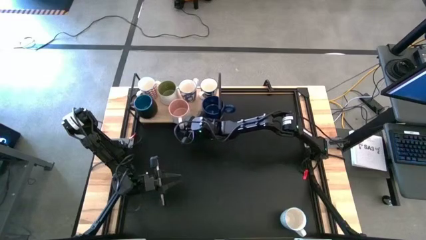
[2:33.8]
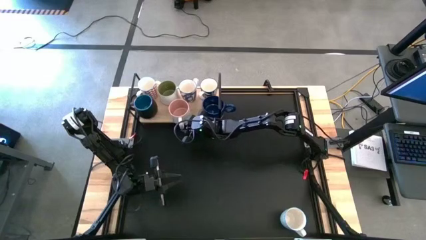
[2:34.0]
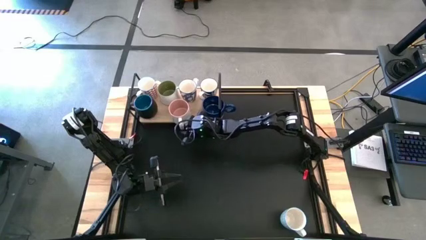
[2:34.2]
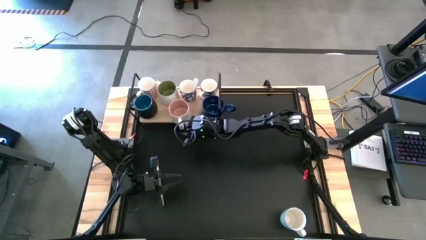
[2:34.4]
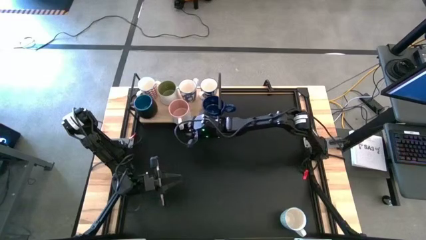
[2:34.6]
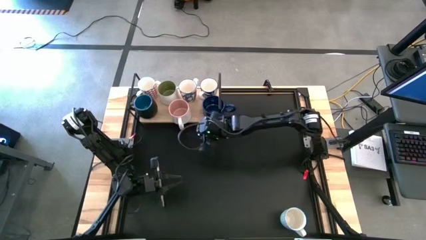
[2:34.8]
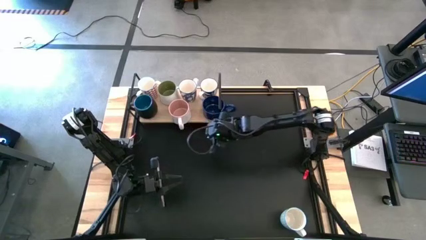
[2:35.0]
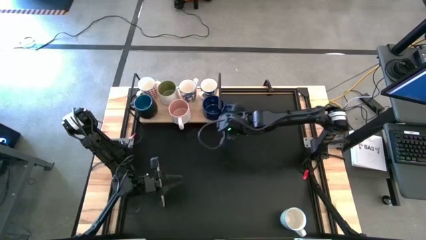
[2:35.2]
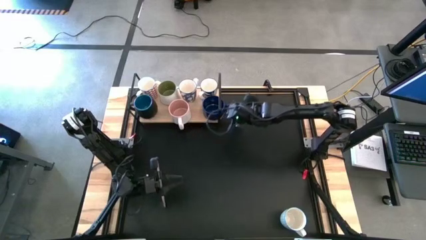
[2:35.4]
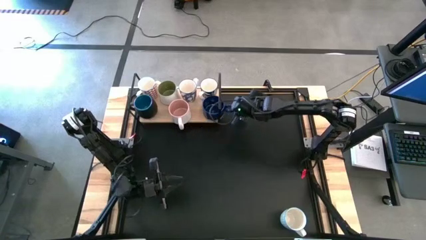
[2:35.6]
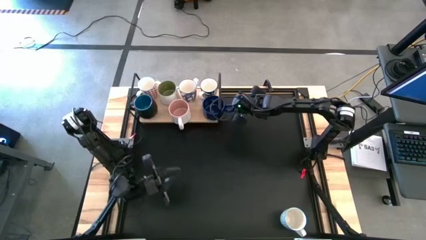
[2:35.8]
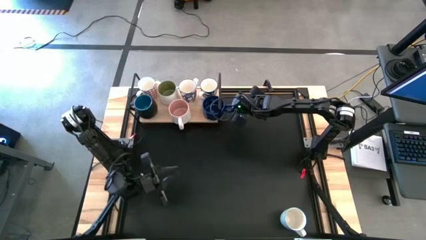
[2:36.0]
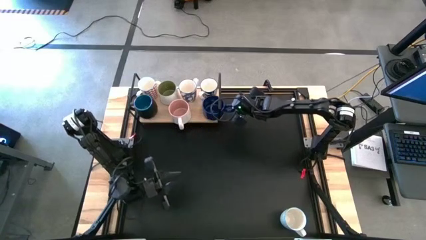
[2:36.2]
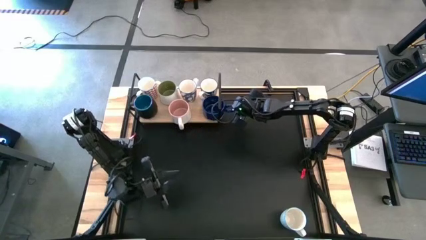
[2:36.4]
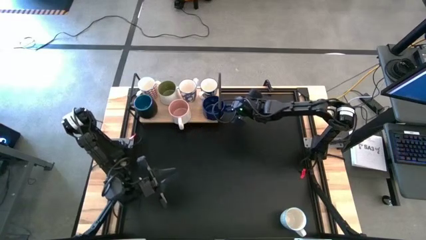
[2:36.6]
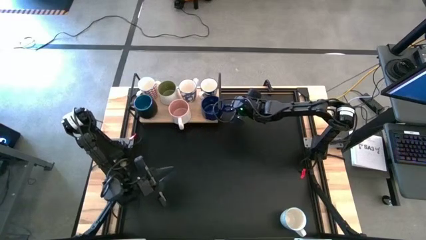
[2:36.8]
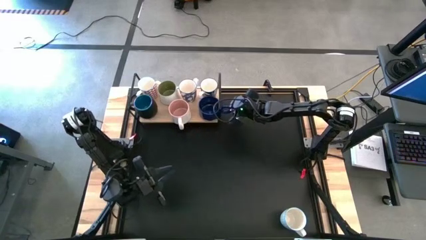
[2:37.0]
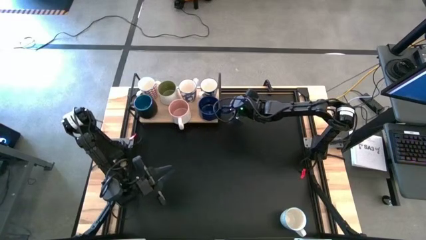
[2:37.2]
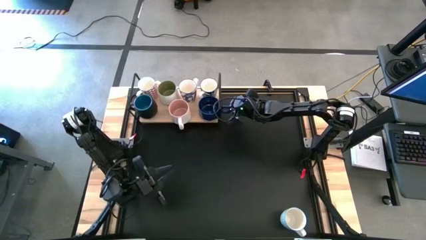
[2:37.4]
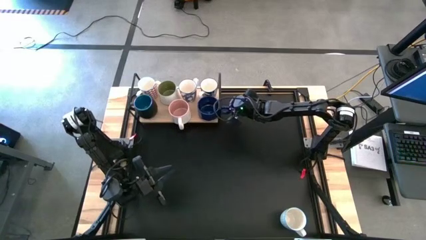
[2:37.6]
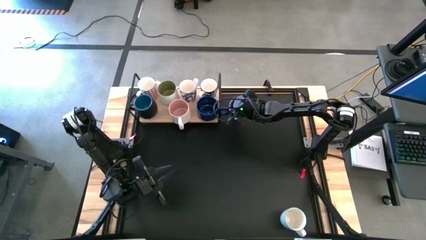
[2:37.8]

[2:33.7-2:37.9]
Task: Place coffee mugs
Adjust the blue mug on the shelf

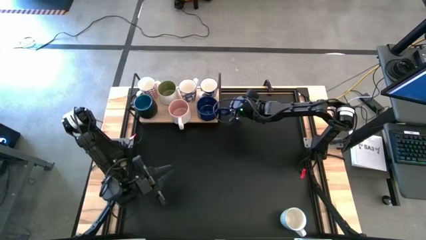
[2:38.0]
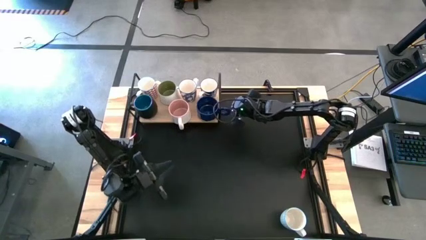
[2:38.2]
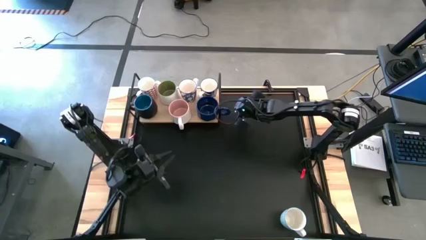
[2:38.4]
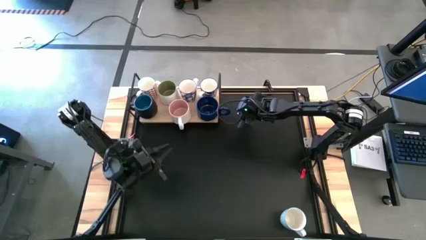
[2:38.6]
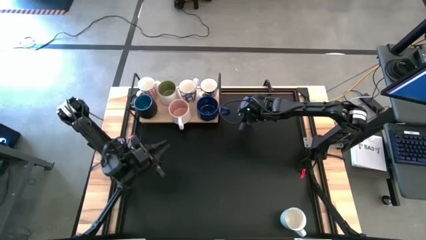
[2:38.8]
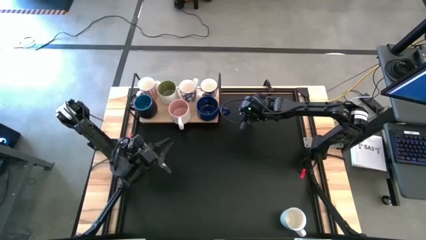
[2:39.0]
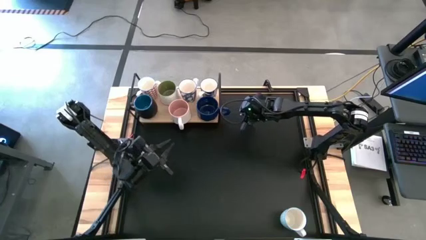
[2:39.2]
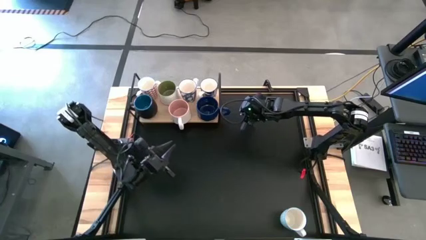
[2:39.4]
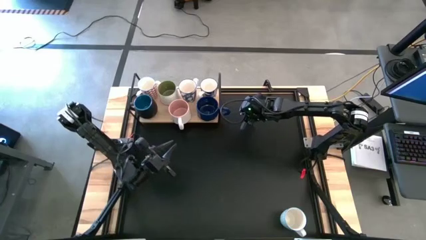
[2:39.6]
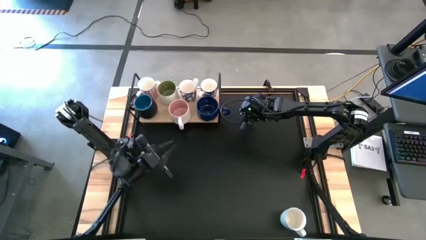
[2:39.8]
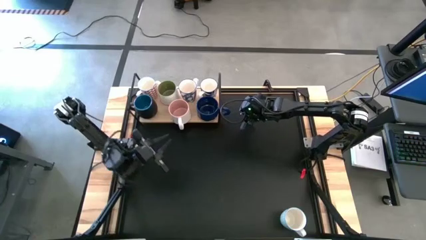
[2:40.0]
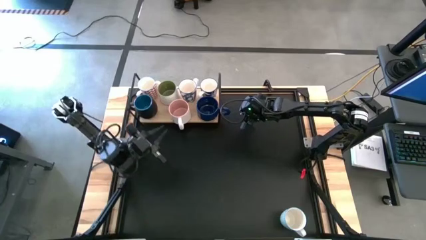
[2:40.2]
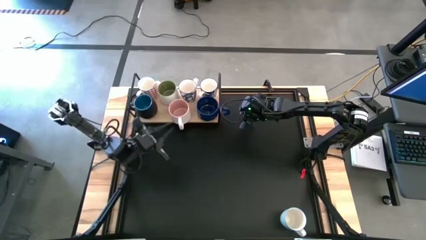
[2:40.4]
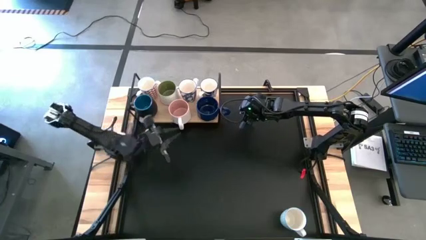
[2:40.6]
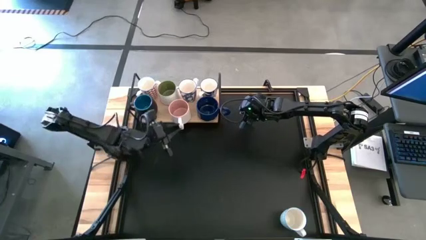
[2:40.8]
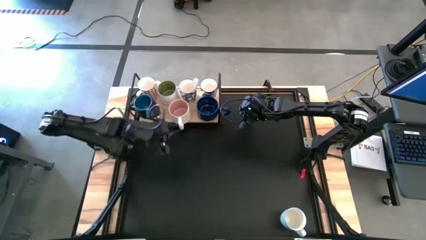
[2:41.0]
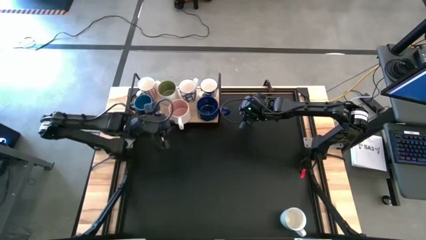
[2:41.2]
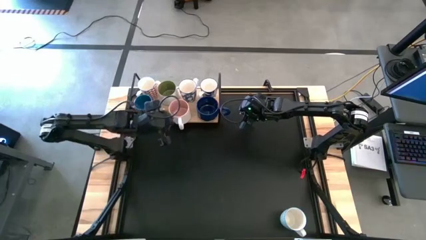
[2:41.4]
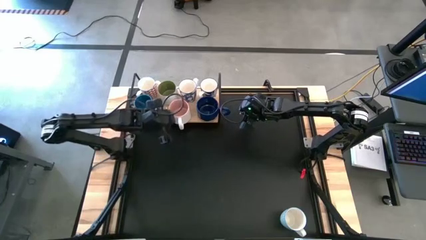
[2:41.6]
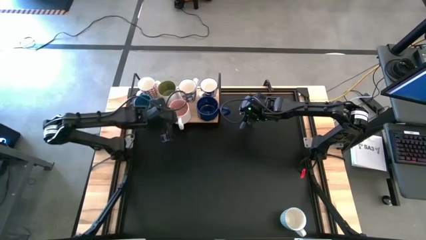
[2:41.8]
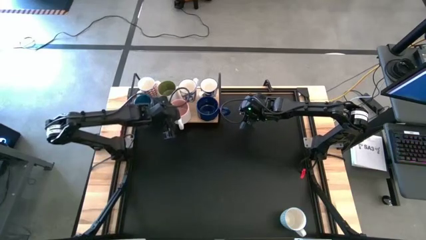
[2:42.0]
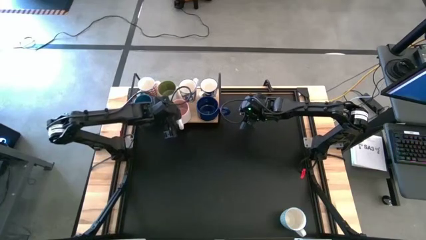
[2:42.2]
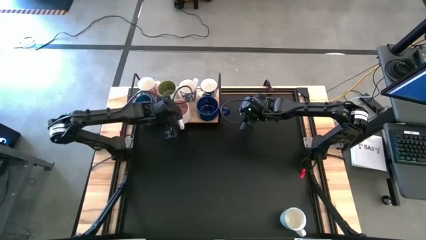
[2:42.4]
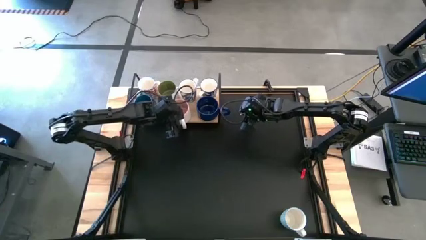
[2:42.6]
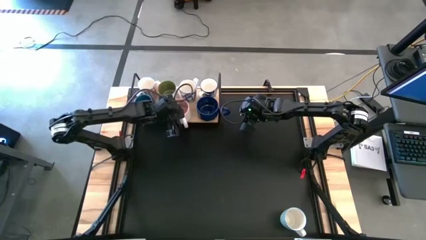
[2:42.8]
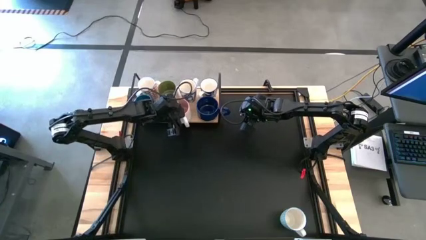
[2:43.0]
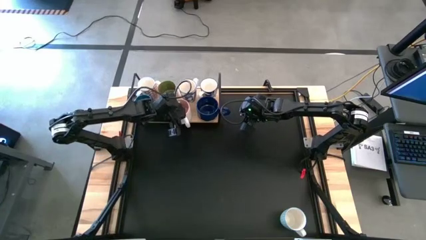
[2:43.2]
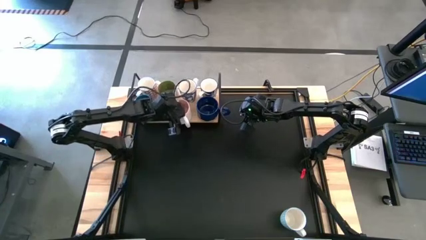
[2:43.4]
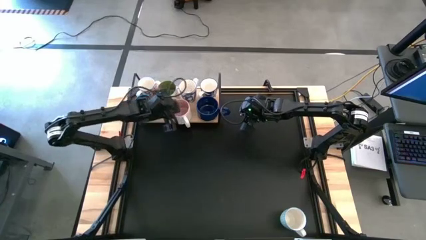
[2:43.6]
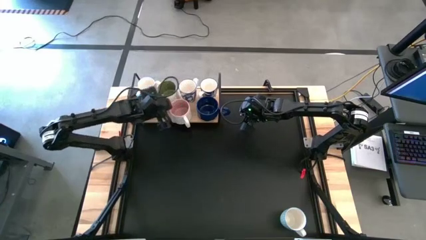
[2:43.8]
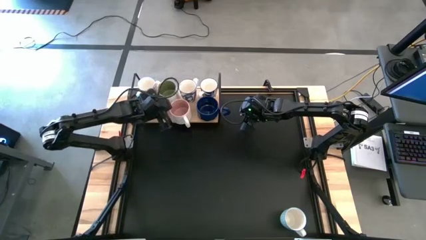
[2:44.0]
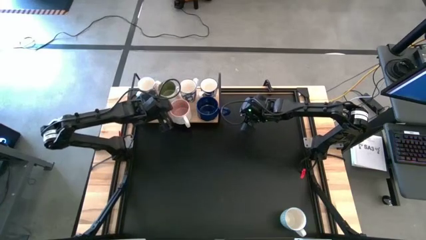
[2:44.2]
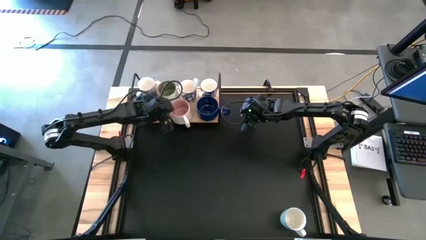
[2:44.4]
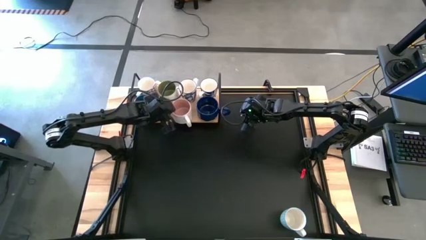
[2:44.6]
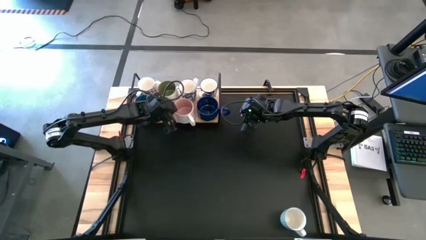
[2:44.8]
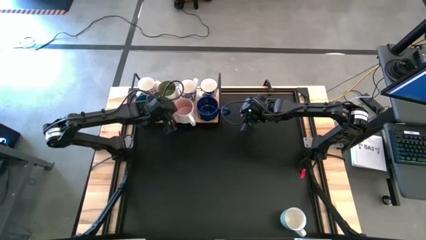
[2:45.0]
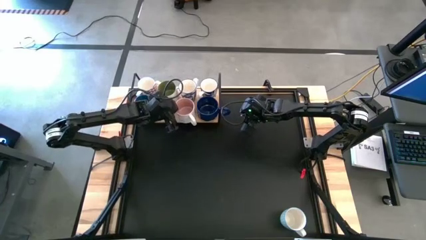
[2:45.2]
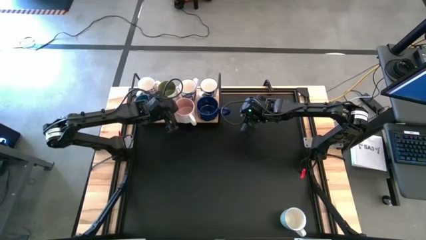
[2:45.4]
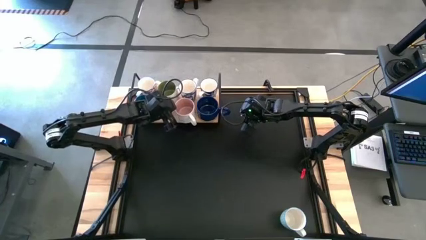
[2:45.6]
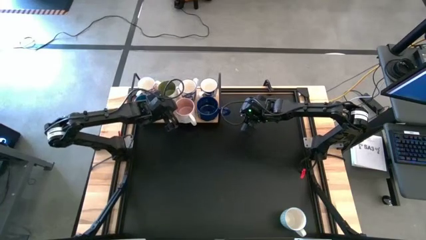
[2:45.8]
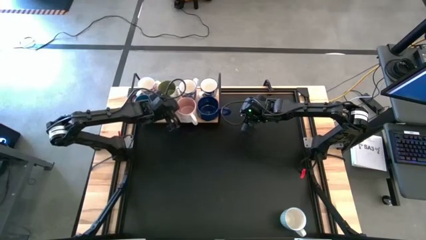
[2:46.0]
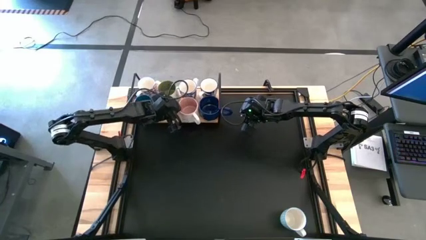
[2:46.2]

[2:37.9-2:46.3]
Adjust the pink-white mug on the shelf

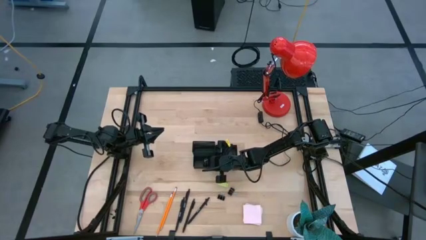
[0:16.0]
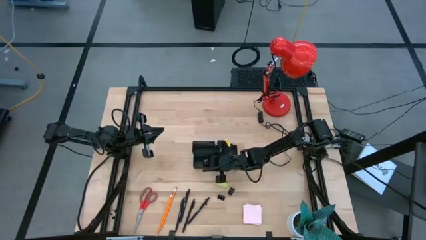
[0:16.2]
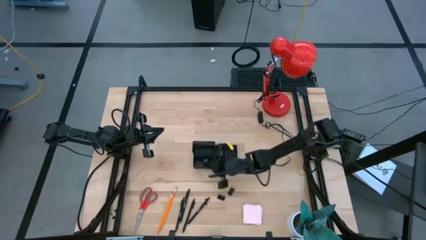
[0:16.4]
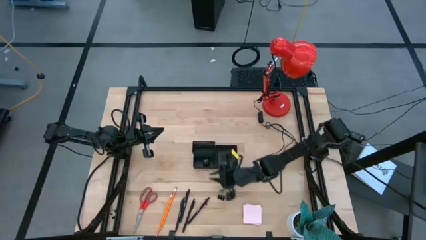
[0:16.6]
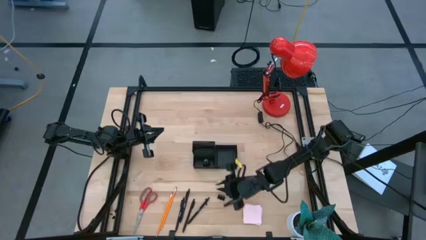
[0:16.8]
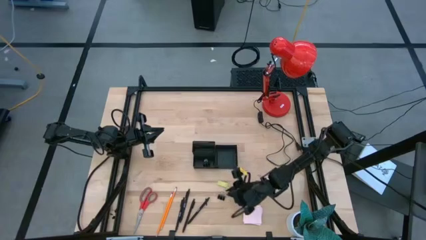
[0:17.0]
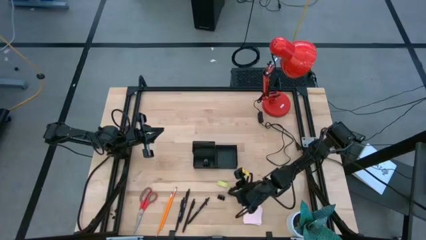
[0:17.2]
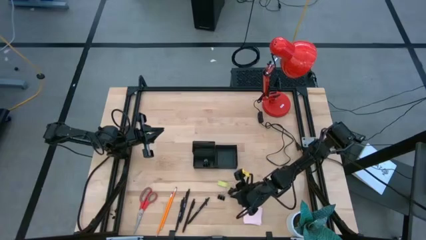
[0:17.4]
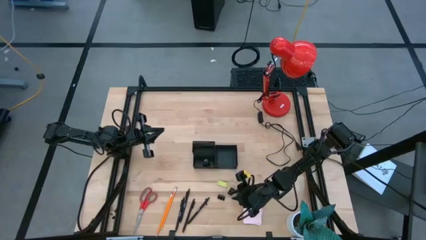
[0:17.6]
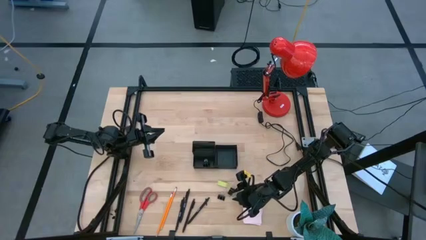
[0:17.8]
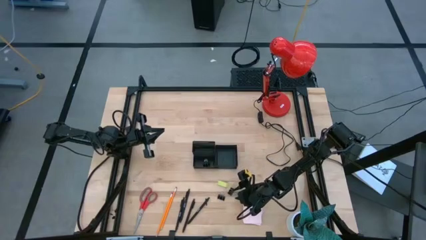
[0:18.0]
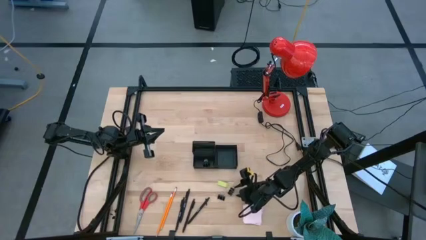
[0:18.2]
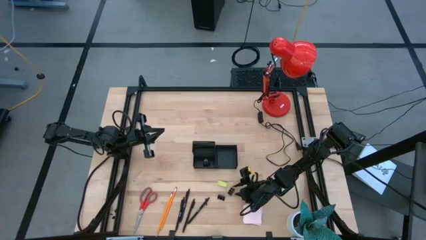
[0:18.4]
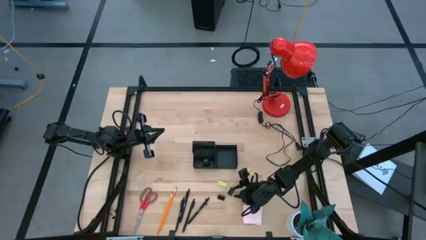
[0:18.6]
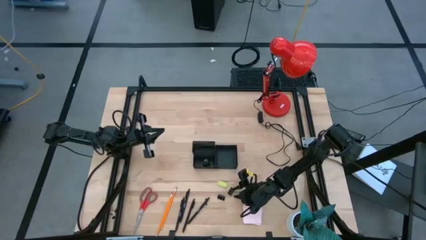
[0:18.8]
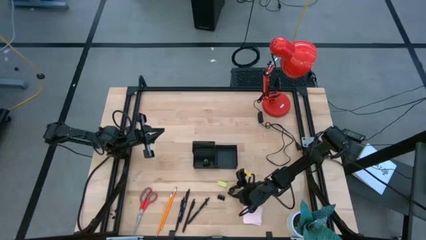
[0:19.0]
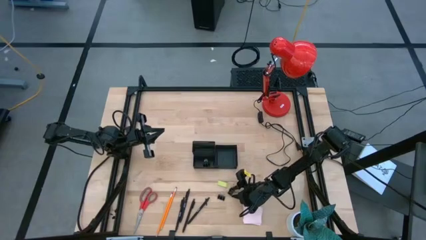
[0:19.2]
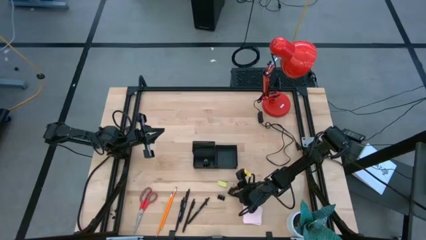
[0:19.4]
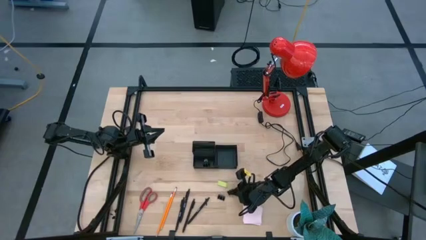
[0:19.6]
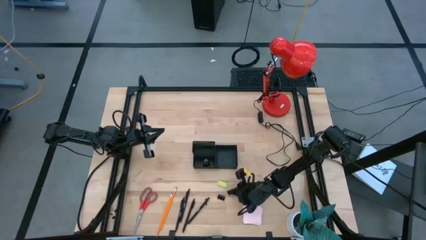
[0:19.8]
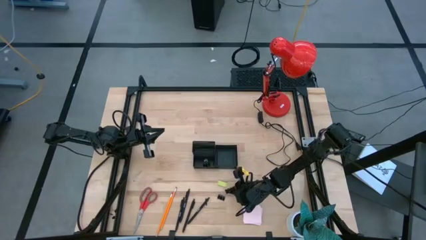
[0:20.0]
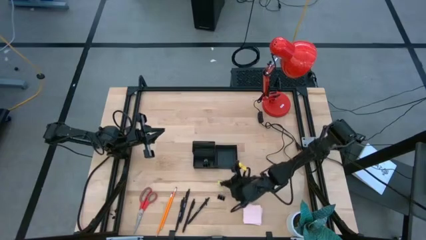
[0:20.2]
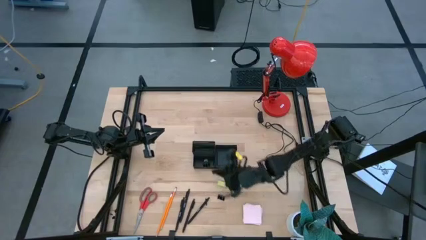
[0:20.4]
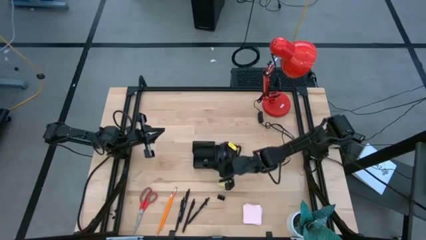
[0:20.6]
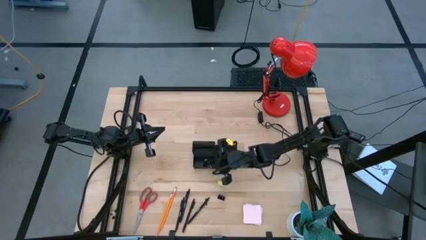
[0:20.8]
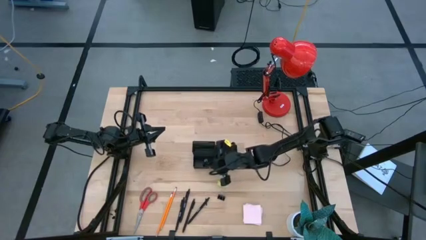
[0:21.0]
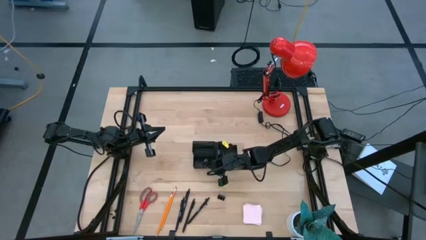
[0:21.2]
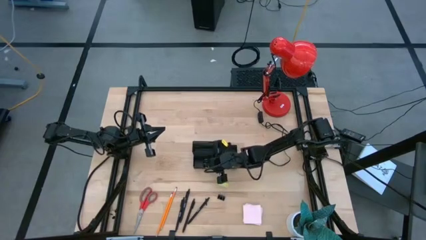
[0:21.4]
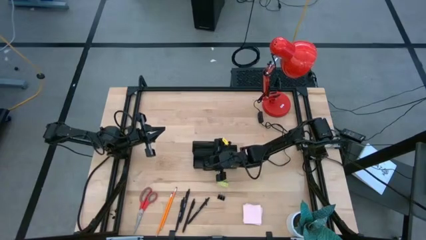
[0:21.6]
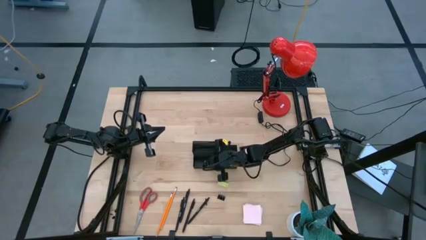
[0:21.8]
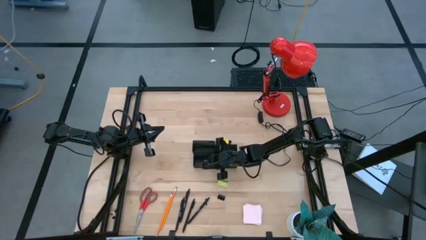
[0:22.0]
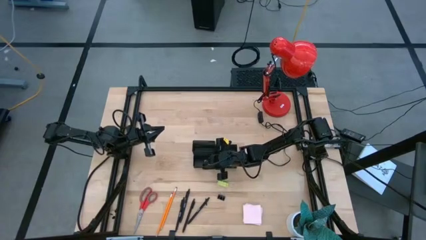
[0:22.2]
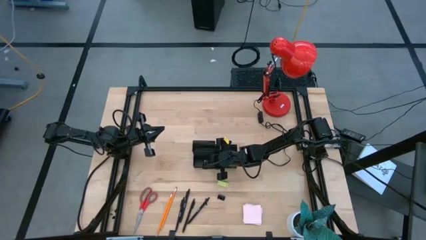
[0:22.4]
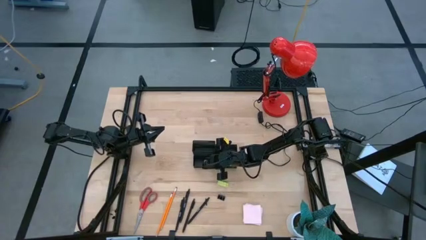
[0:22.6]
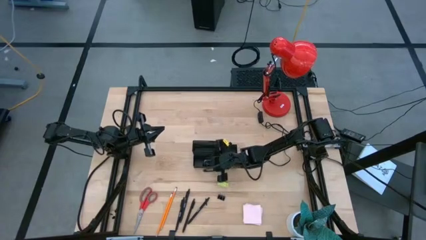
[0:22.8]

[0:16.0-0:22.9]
Task: Pick and place office supplies into organizer
Put the black binder clip into the mesh desk organizer
